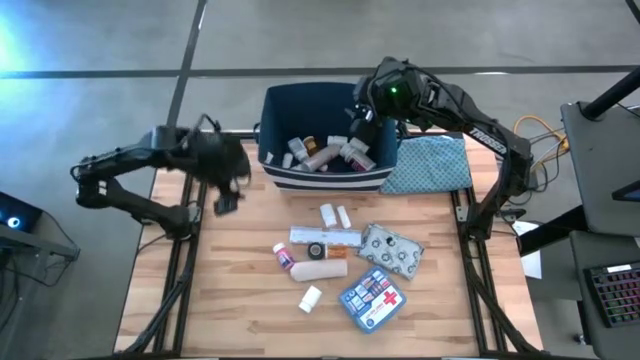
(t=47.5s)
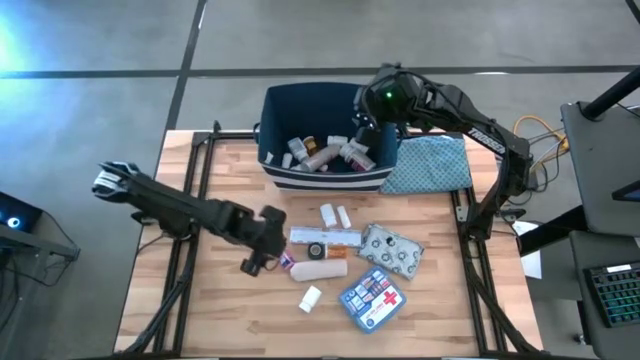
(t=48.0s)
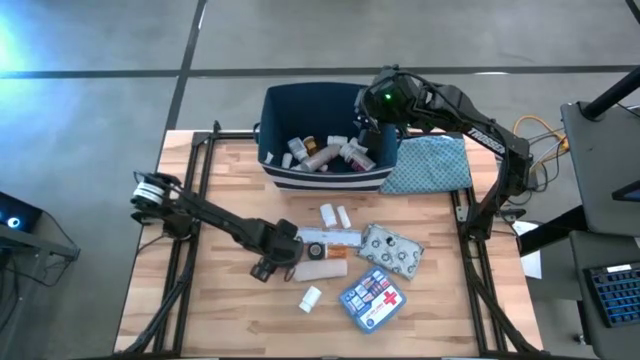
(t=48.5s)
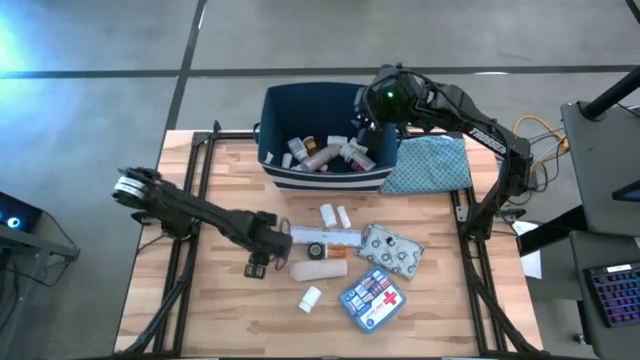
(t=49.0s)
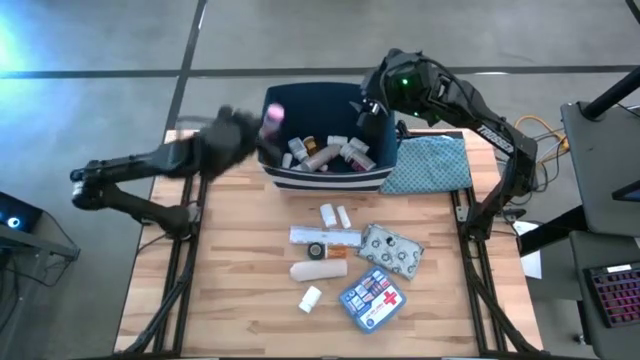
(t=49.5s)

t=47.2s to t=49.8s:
Task: Pick & place medical supplies in basket/bin
Put the pink medicine bottle into the blue bin

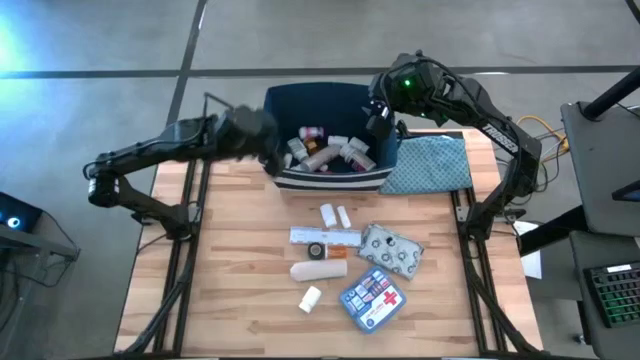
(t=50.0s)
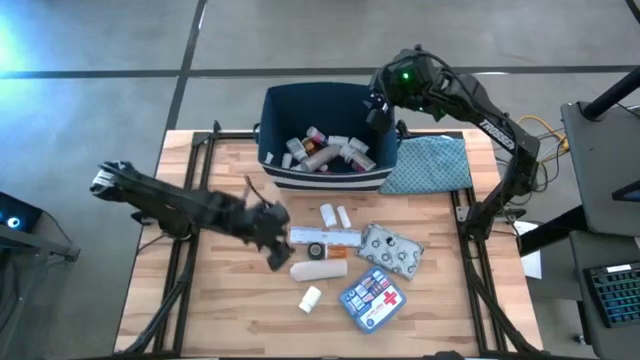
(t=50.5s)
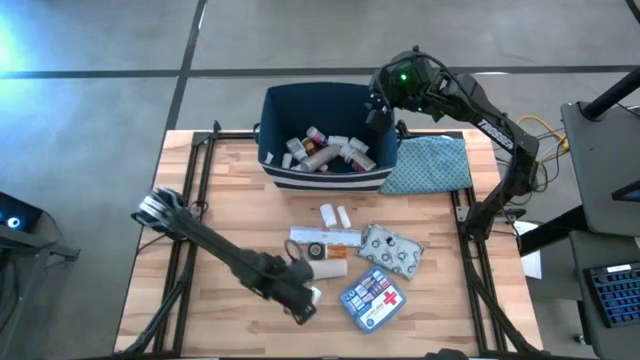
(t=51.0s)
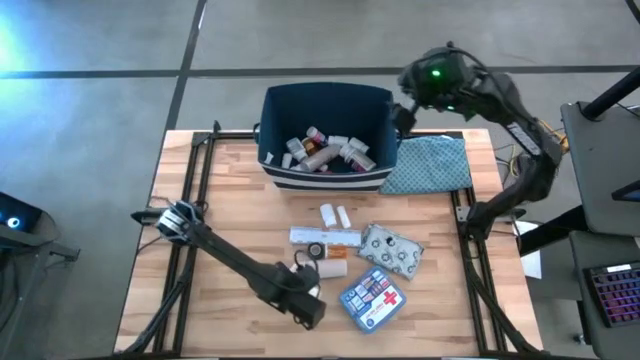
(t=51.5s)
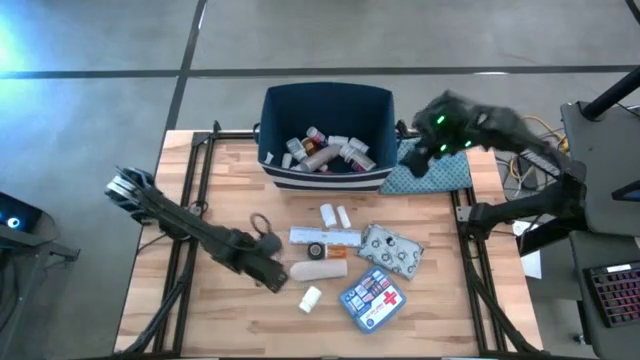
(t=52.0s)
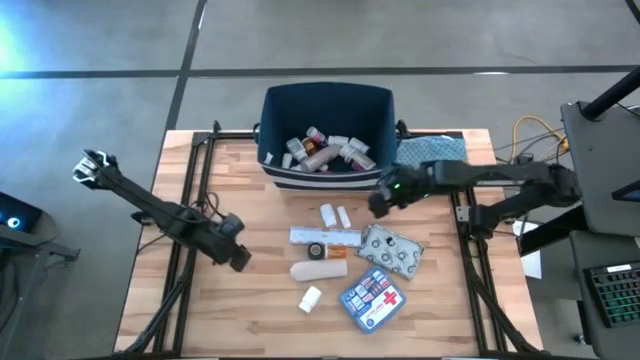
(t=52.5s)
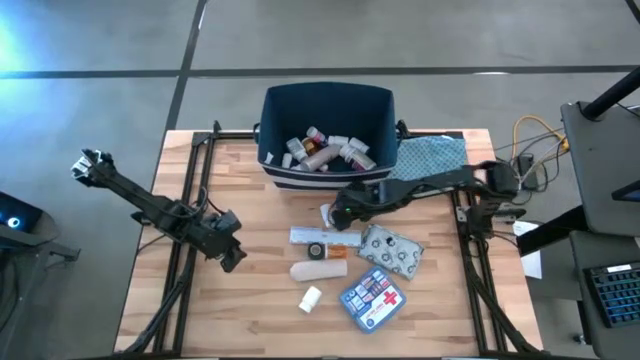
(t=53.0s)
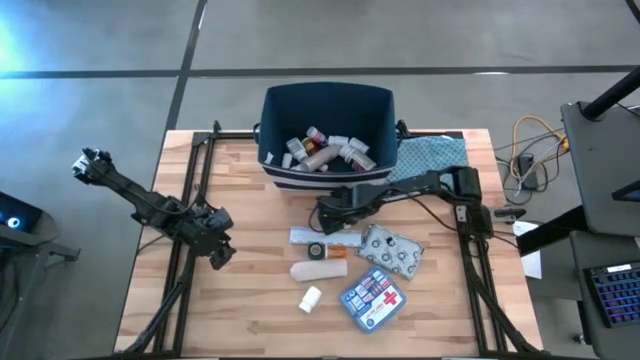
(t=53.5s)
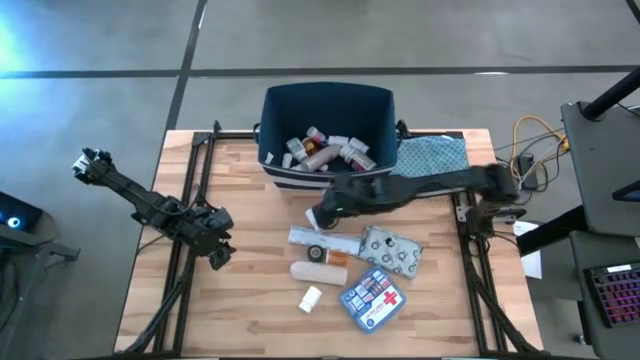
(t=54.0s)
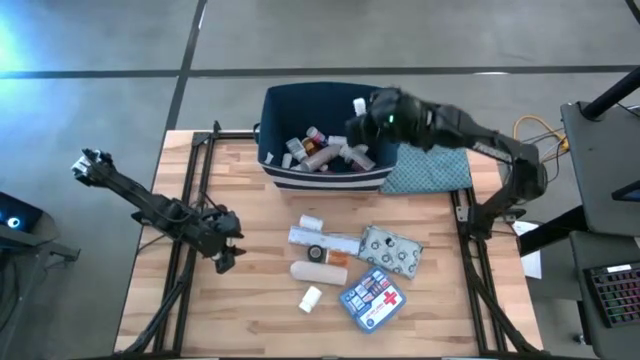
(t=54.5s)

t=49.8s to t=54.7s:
Put the white rolled gauze into the blue bin

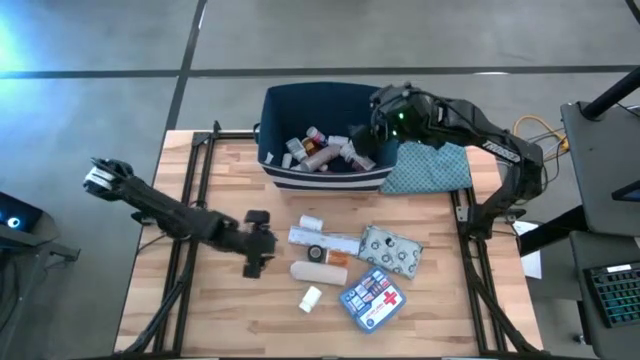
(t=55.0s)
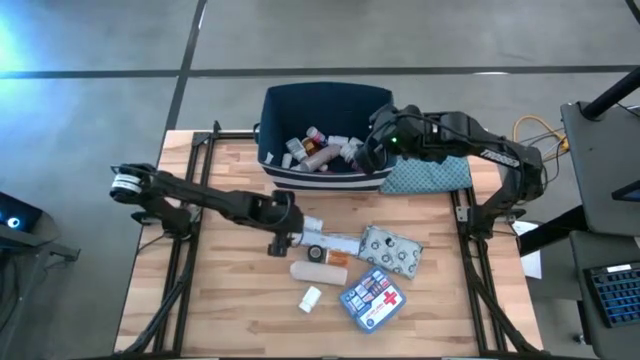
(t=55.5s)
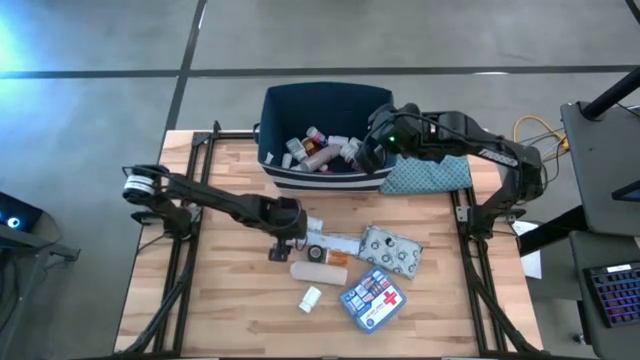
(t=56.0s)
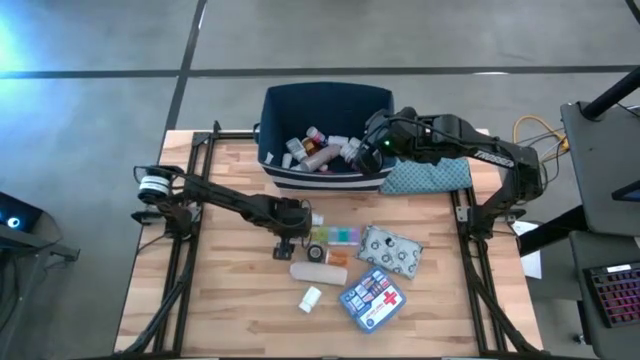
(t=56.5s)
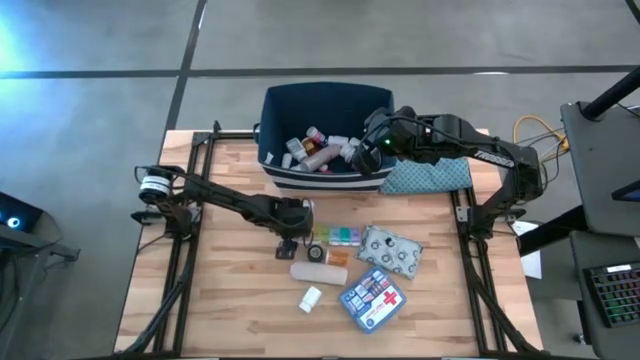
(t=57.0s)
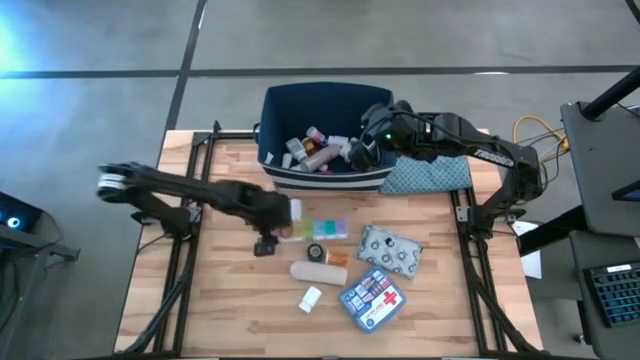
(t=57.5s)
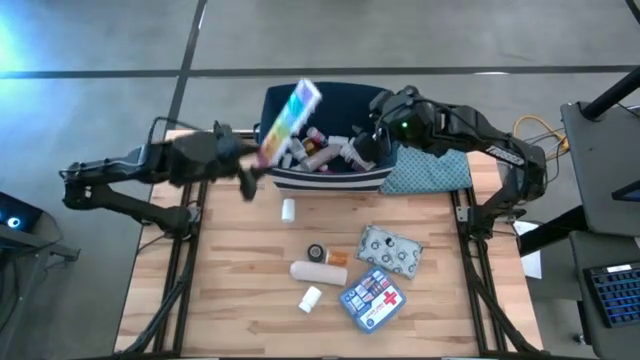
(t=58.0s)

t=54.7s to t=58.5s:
Put the medicine organizer into the blue bin

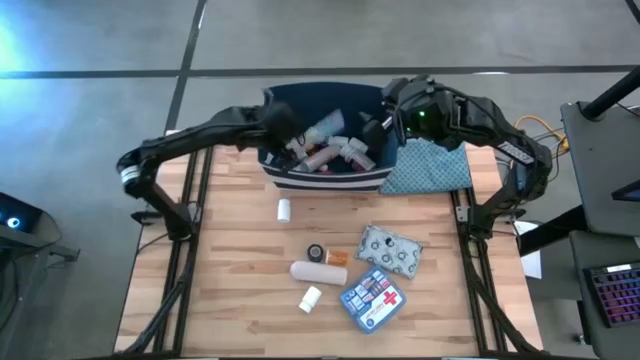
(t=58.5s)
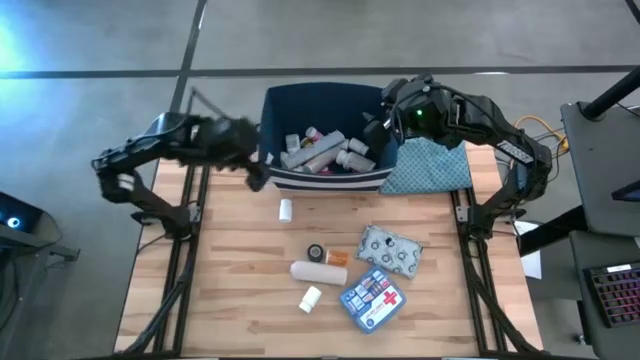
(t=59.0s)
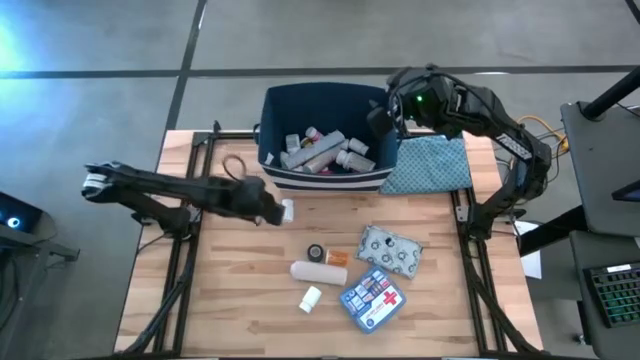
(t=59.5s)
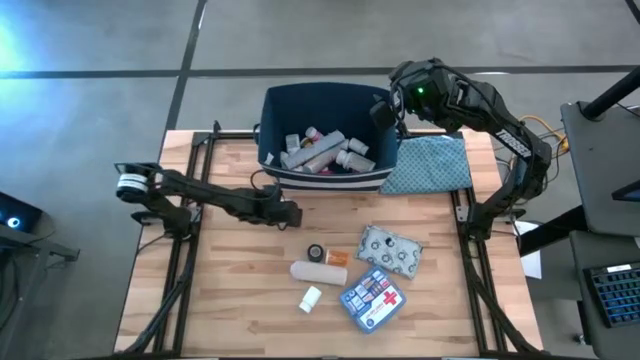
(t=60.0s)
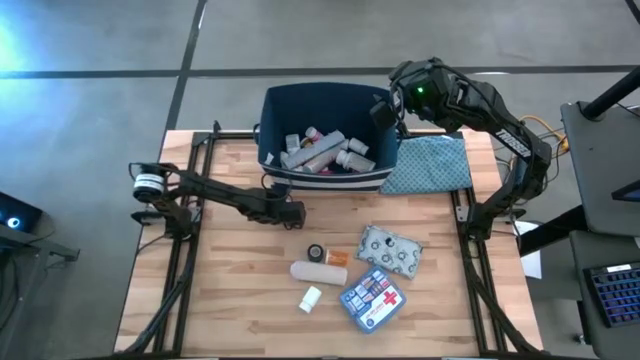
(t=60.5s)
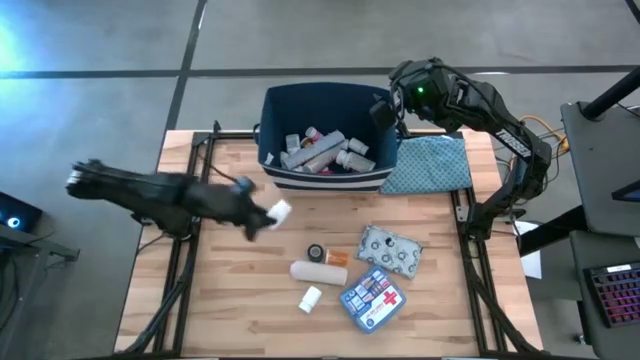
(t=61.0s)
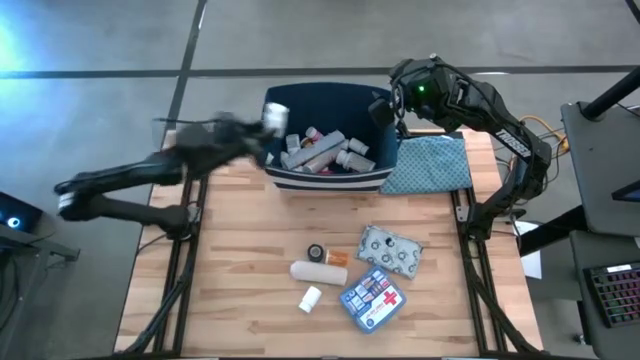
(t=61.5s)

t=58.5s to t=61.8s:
Put the white medicine bottle into the blue bin

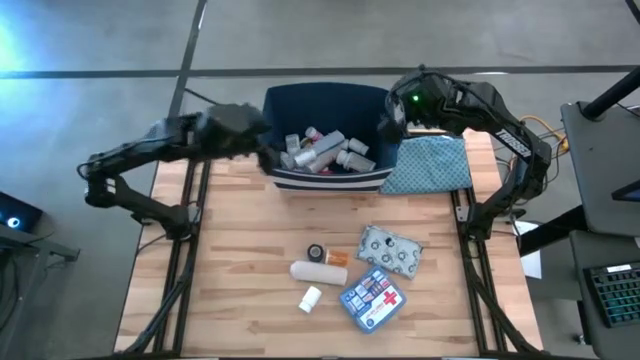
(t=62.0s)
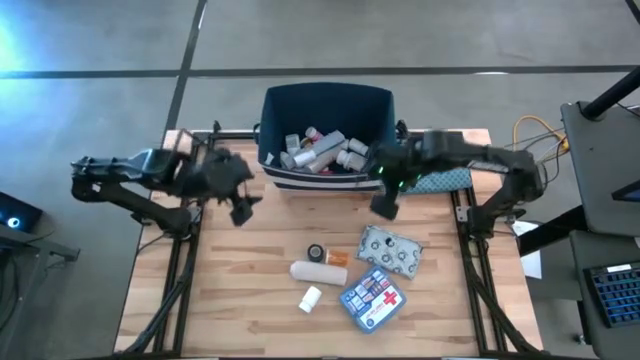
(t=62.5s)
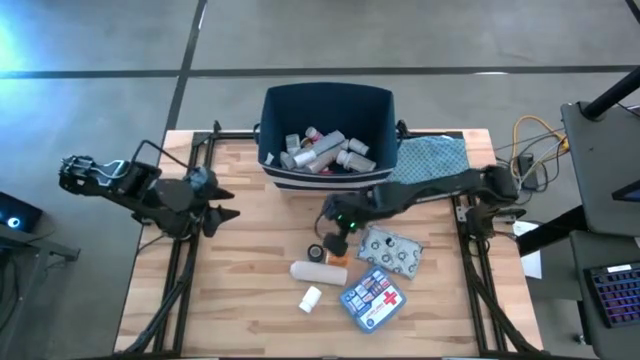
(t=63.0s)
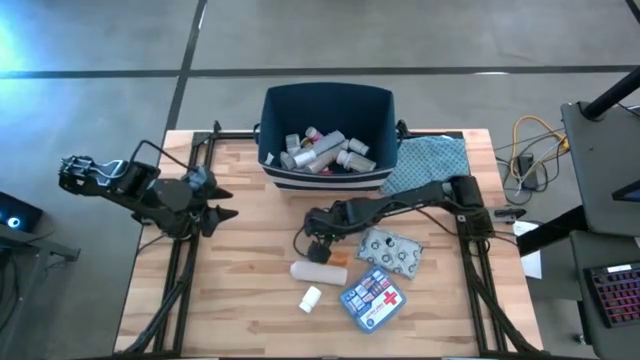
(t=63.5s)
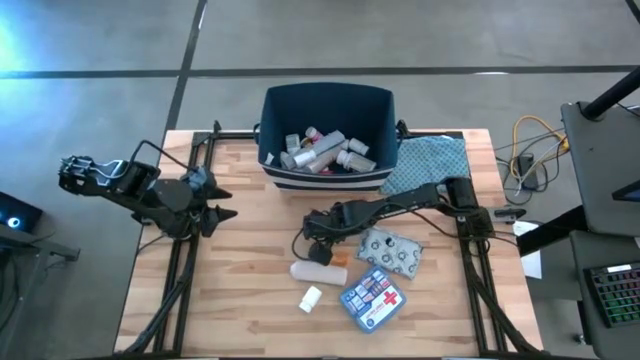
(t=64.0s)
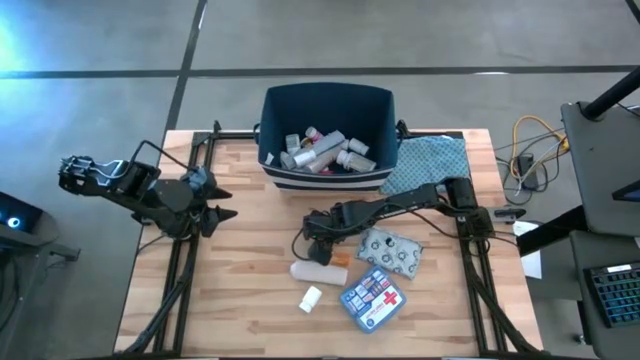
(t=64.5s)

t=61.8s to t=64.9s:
Put the green bandage into the blue bin

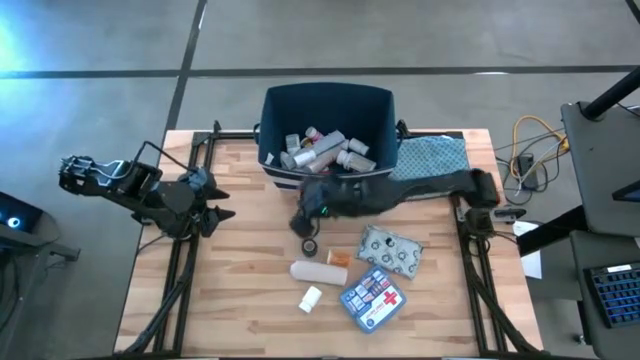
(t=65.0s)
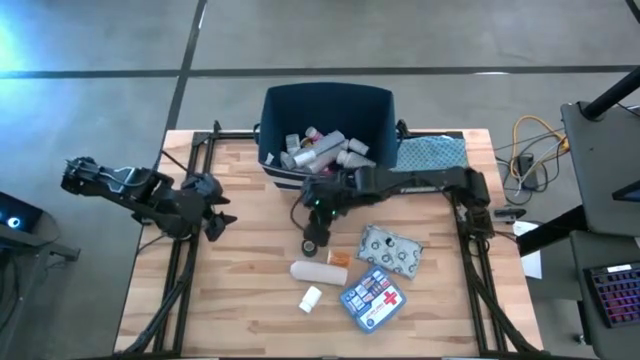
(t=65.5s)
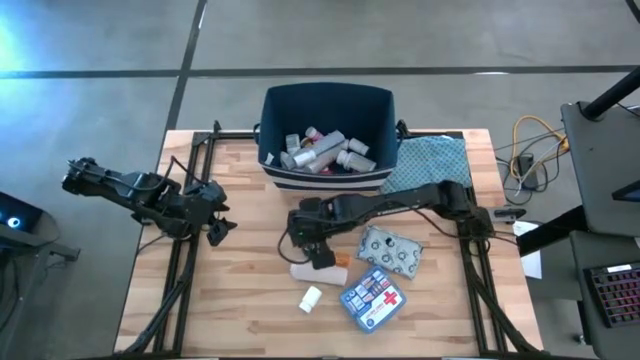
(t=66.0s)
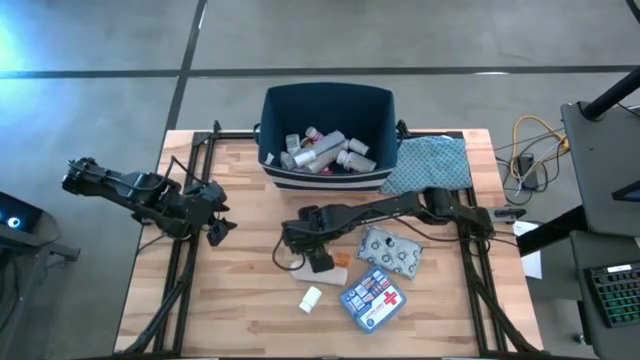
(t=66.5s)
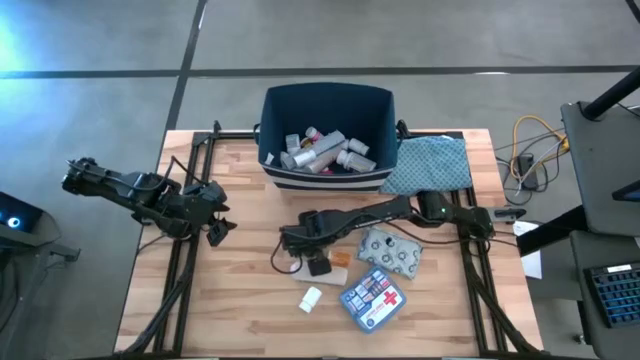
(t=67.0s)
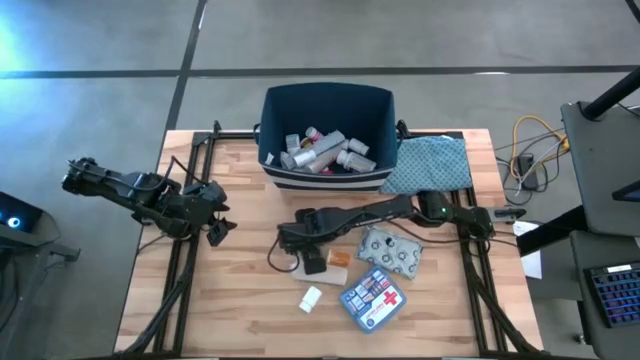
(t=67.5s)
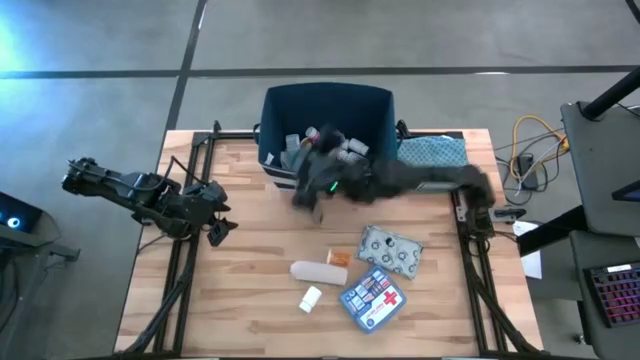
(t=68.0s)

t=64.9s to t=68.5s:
Put the green bandage into the blue bin

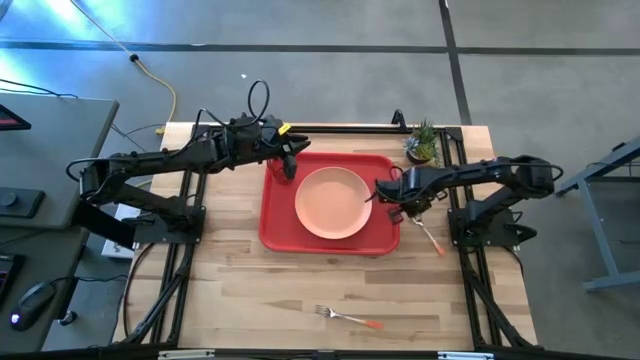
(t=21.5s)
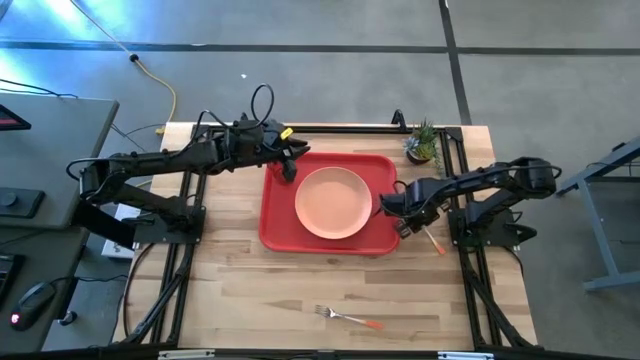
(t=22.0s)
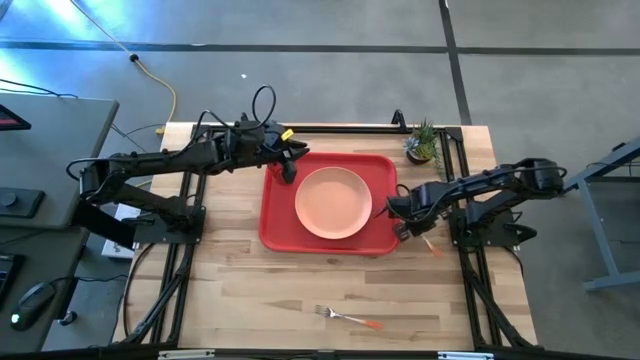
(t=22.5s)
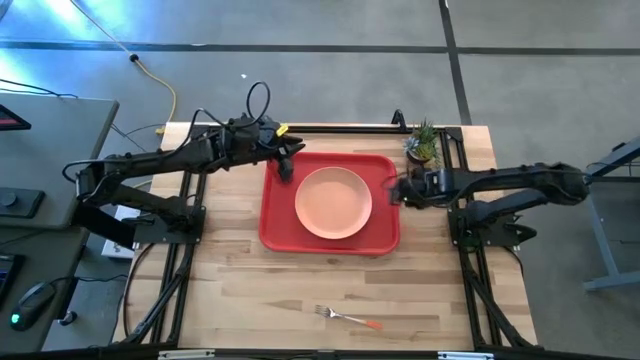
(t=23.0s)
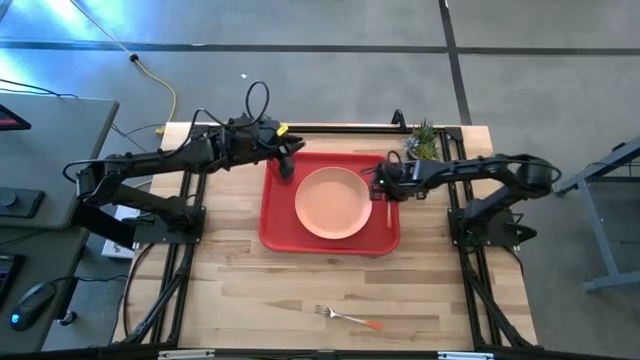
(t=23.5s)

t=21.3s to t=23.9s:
Task: Pick and place plate/cup/fork/spoon on tray
Put the orange spoon on the red tray to the right of the orange plate
